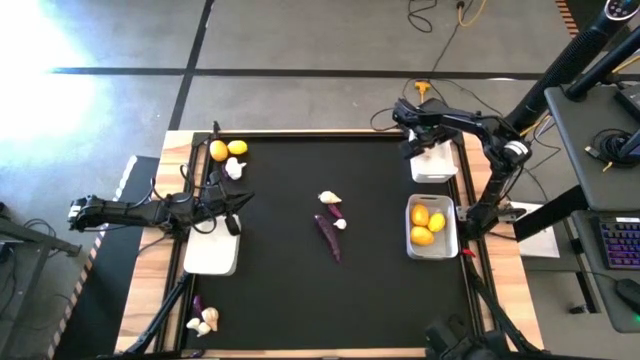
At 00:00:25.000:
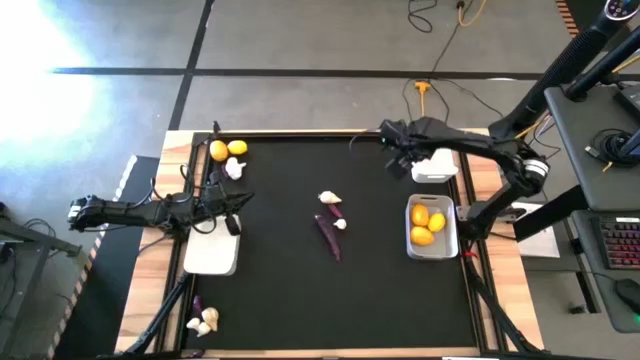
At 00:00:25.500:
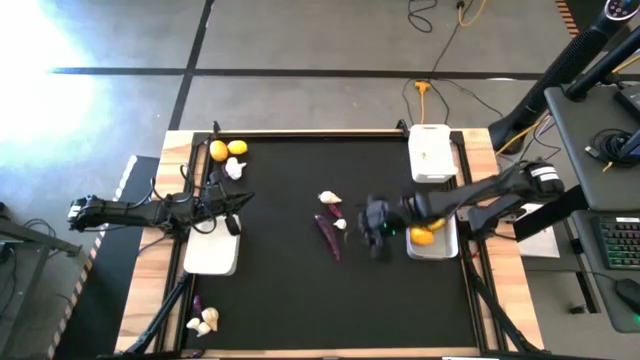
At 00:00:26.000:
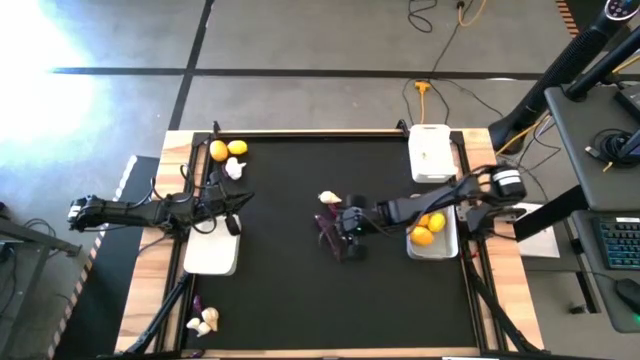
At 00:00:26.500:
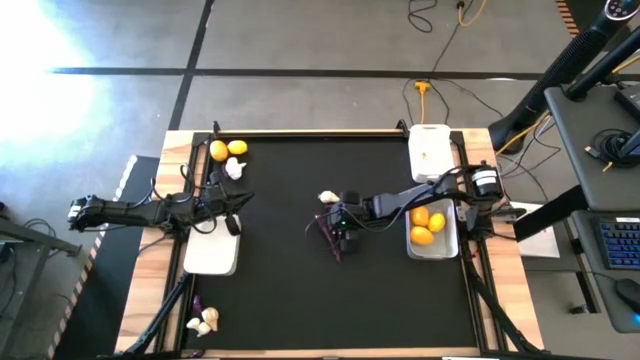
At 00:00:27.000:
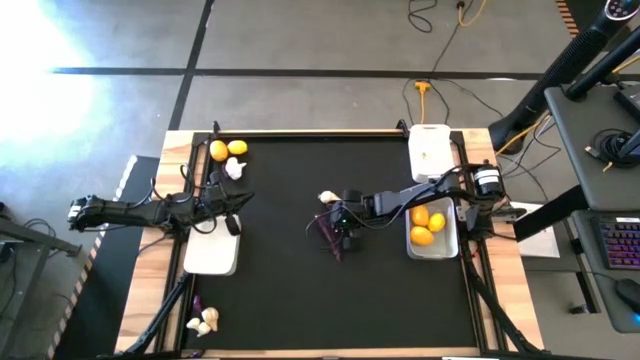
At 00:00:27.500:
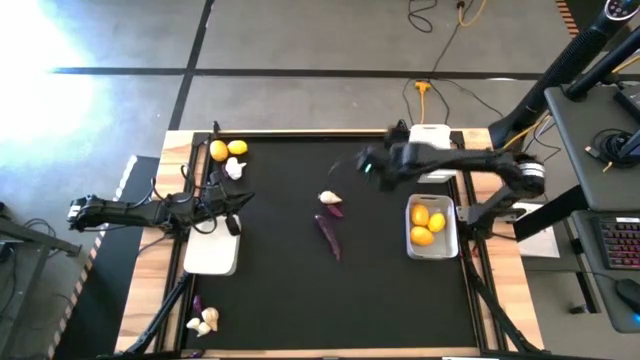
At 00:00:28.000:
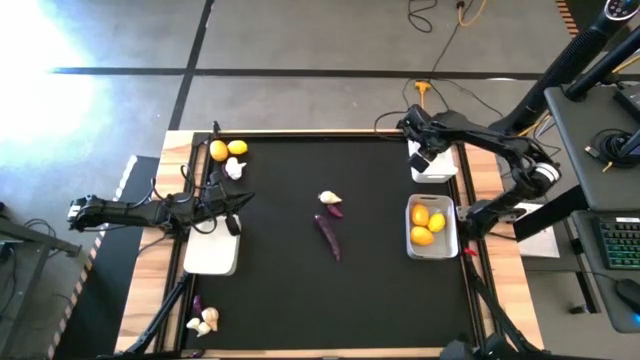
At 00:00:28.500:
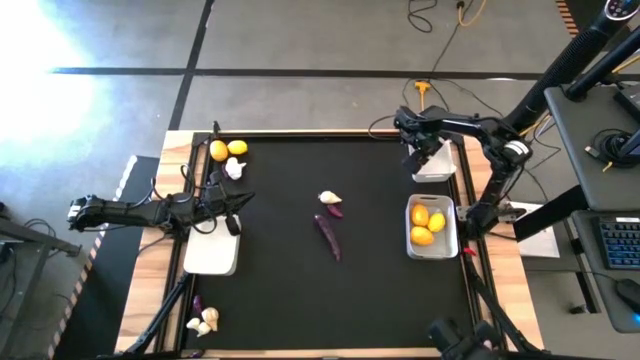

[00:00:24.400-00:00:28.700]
Task: Sort produce into baskets
Put the garlic into the top white bin

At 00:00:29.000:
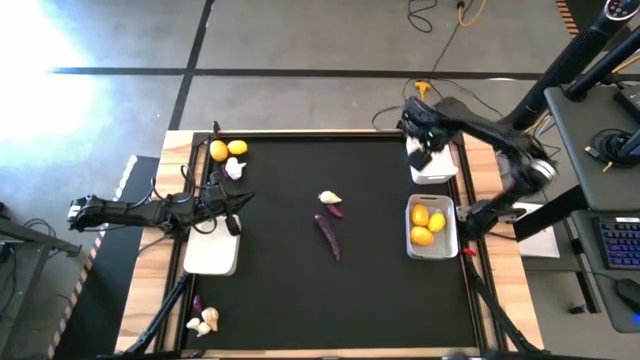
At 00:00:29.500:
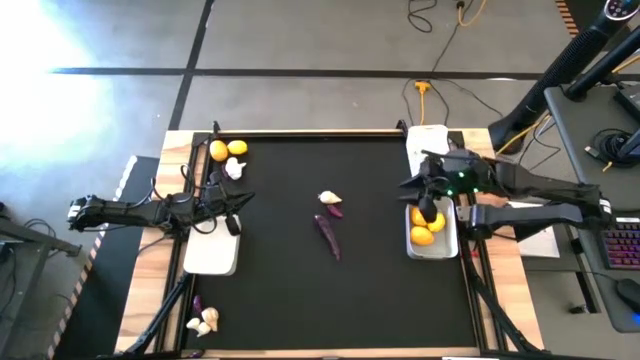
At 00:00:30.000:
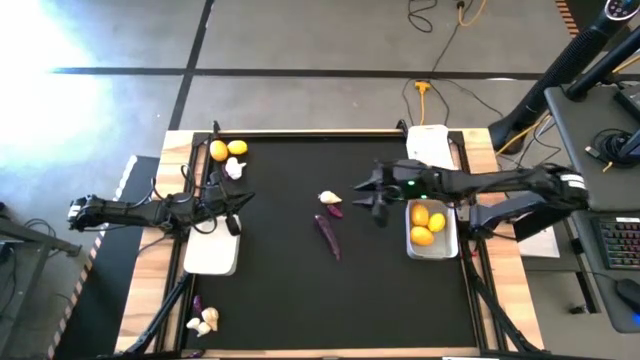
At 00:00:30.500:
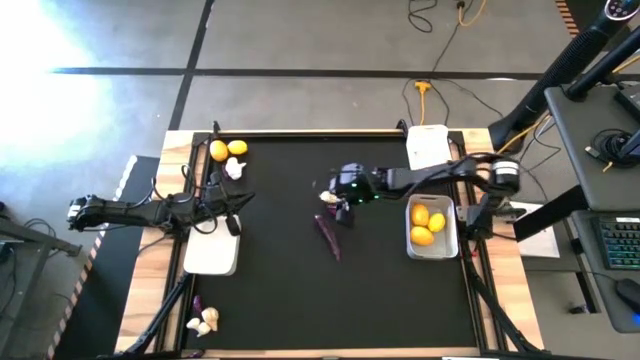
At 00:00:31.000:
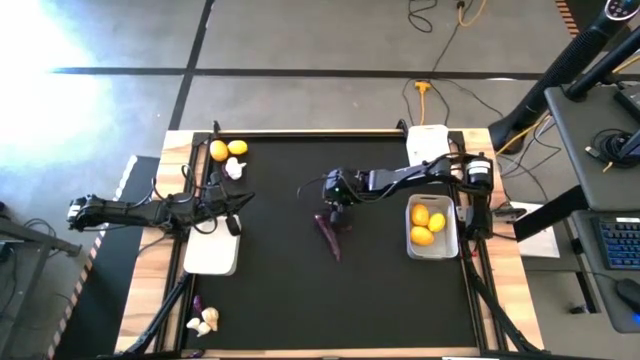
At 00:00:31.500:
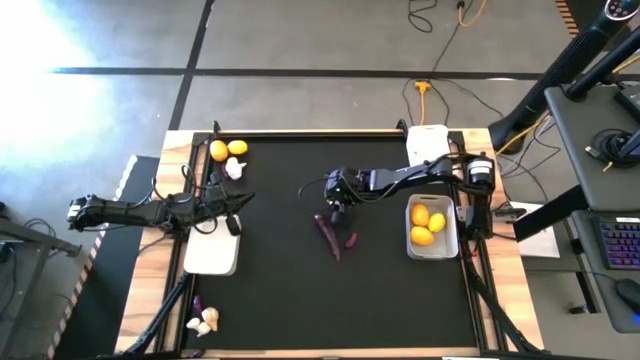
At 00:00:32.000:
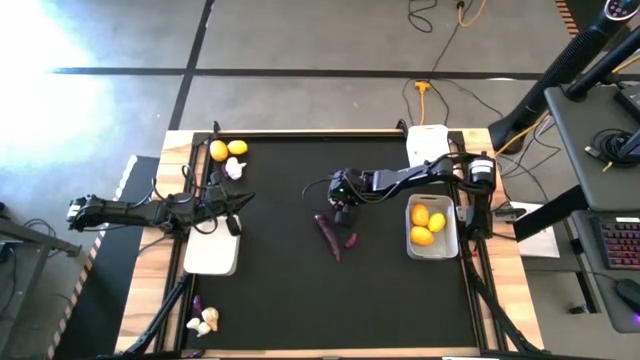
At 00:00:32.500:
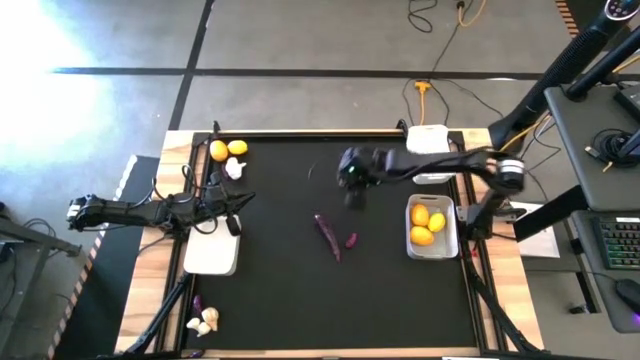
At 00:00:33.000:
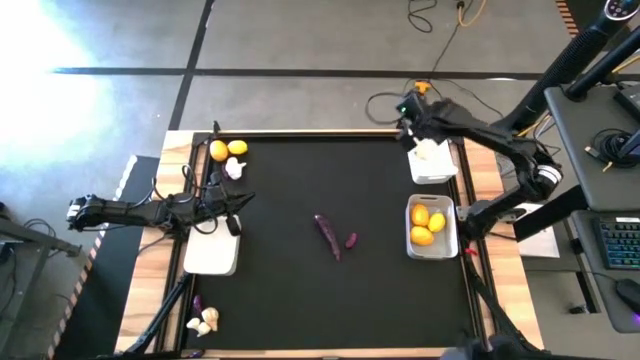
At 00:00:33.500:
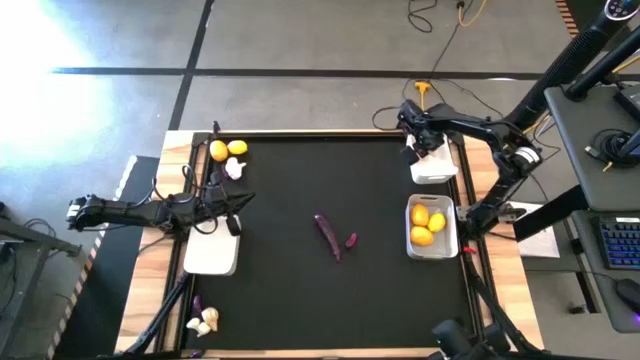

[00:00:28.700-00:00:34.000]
Put the garlic into the top white bin

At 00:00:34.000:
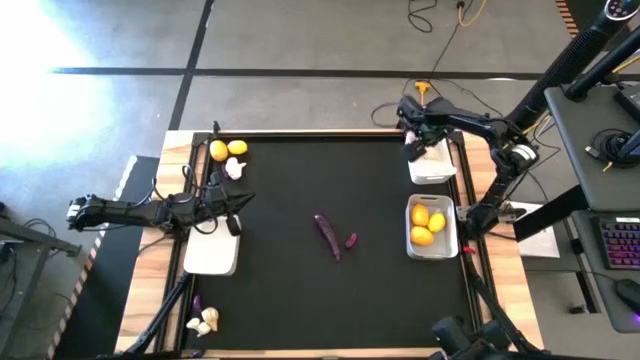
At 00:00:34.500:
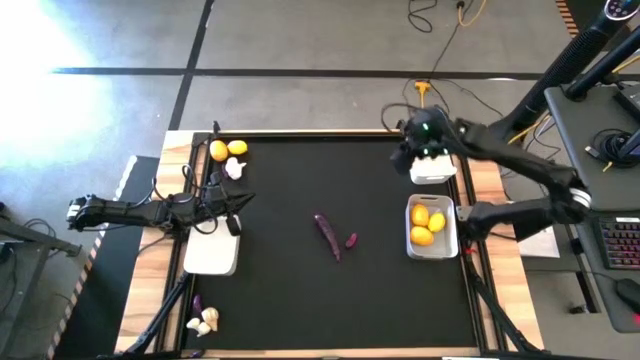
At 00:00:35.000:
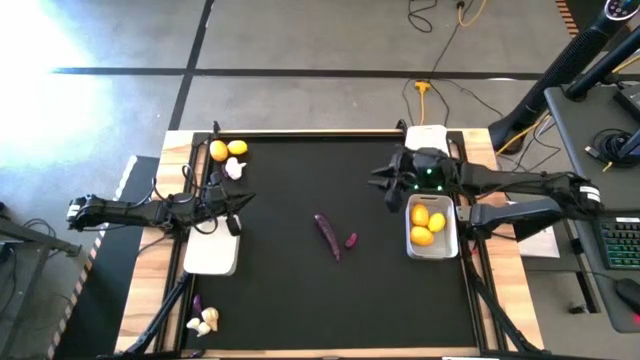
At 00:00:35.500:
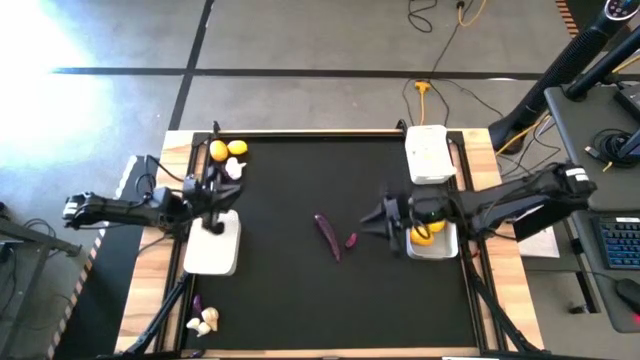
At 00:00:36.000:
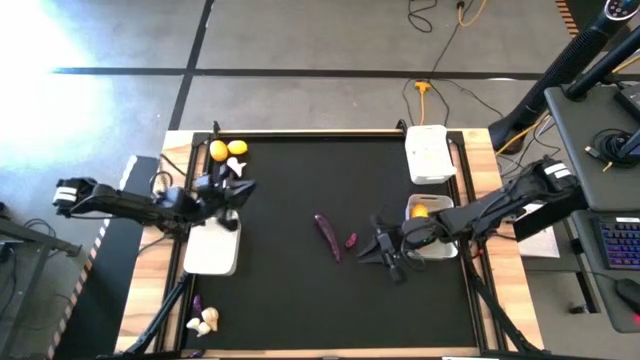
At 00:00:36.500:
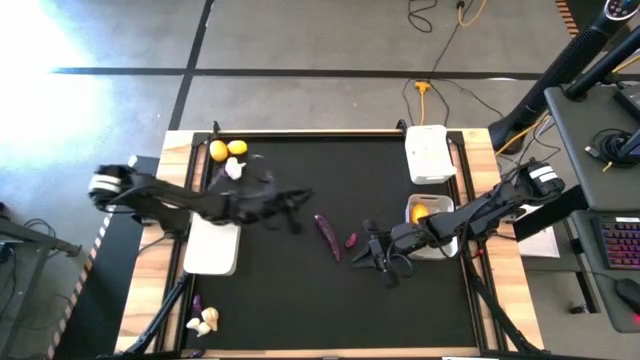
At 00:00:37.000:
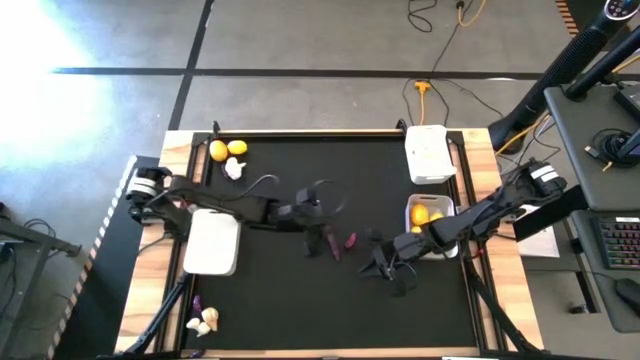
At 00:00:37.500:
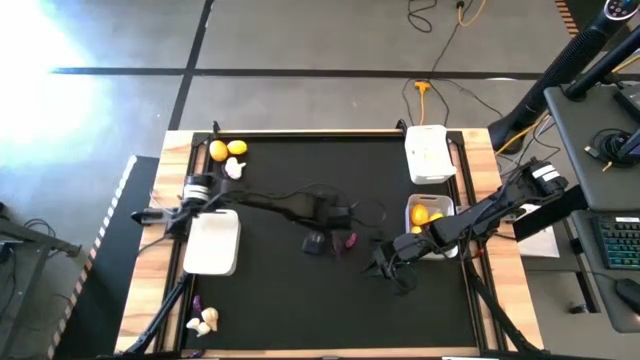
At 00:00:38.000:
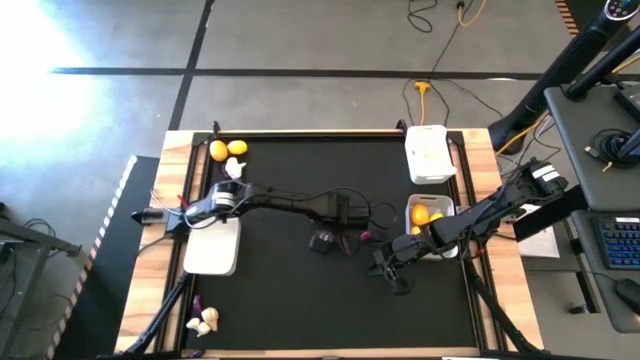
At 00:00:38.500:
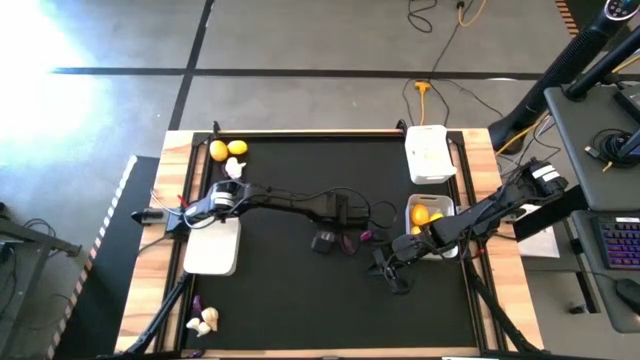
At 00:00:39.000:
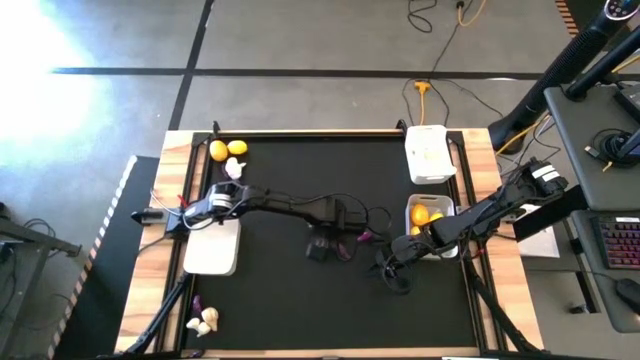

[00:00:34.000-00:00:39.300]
Put the eggplant into the bottom white bin

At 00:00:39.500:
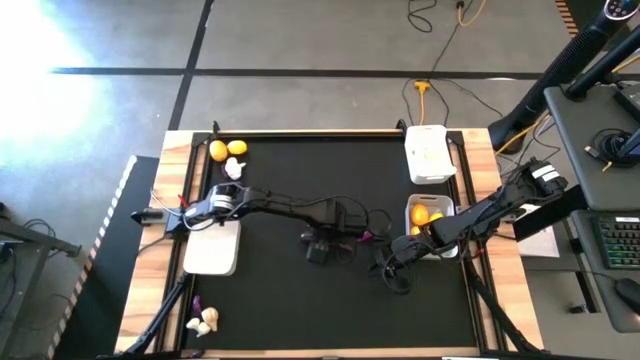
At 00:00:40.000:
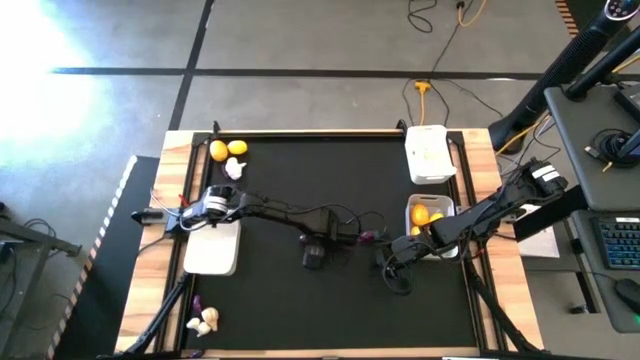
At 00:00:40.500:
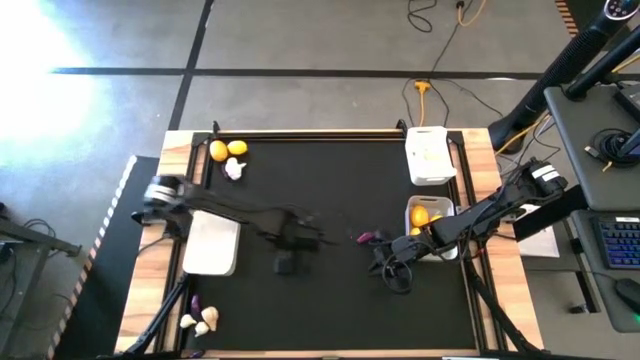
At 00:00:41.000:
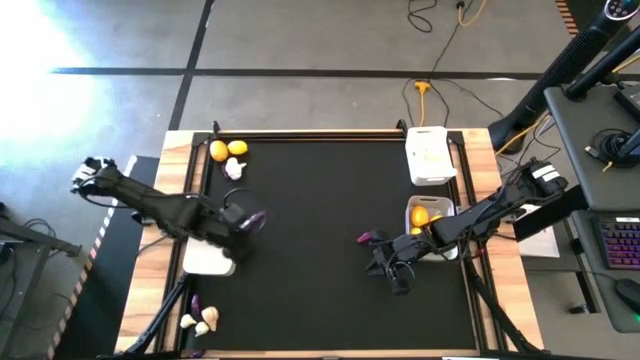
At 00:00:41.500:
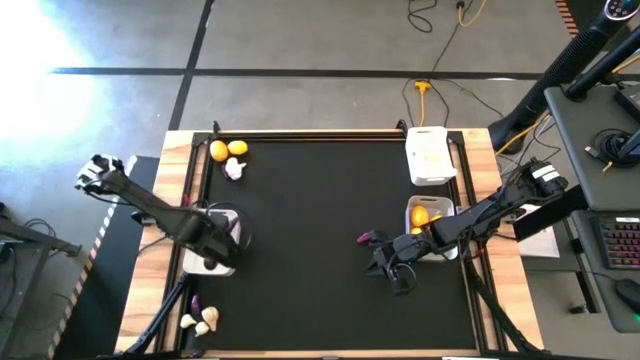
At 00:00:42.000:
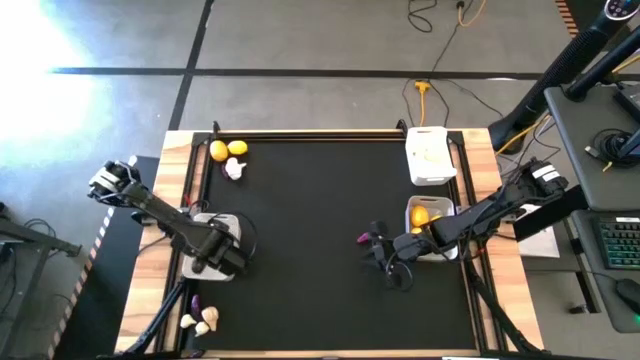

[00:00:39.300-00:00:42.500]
Put the eggplant into the bottom white bin

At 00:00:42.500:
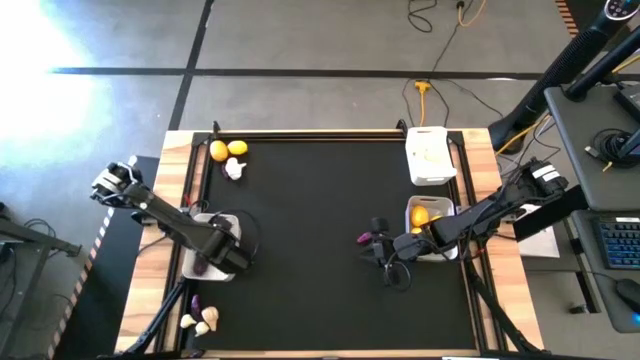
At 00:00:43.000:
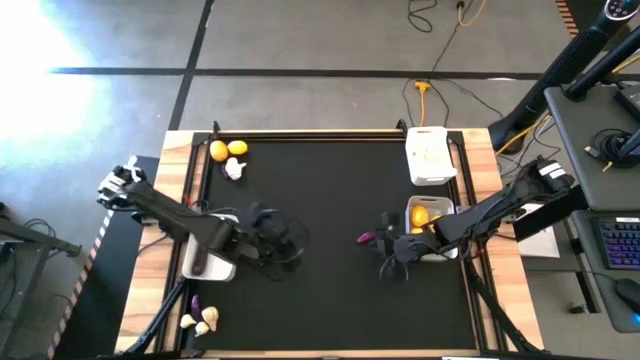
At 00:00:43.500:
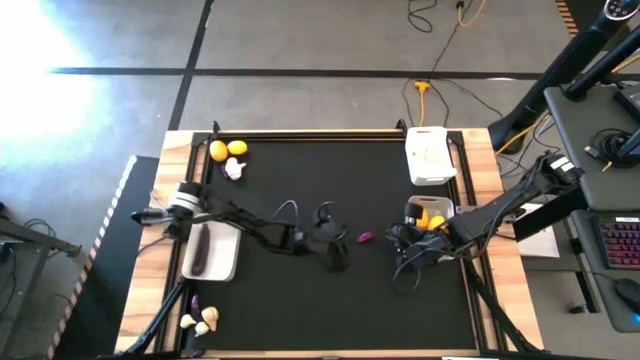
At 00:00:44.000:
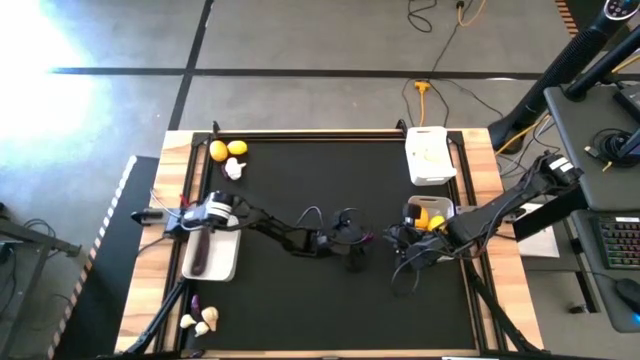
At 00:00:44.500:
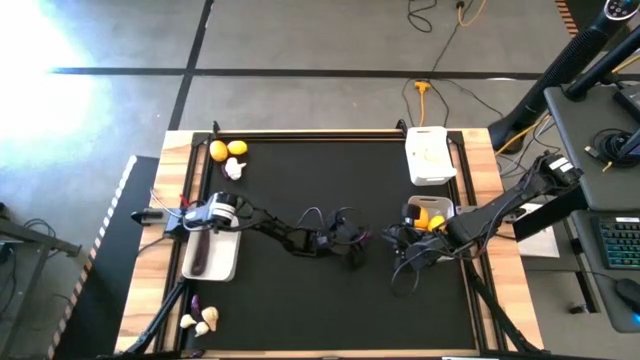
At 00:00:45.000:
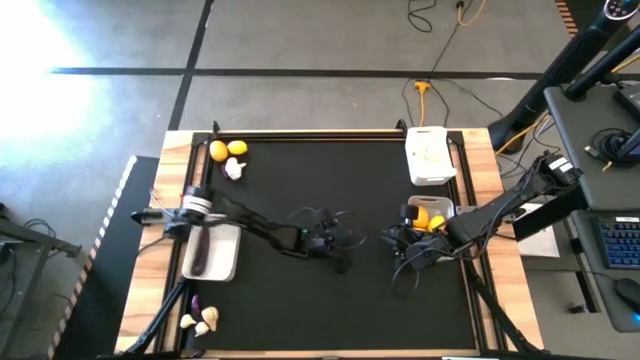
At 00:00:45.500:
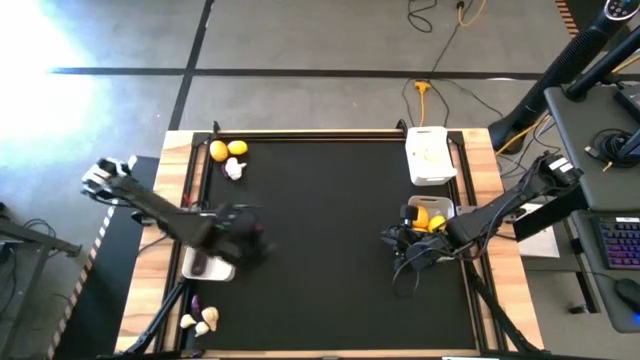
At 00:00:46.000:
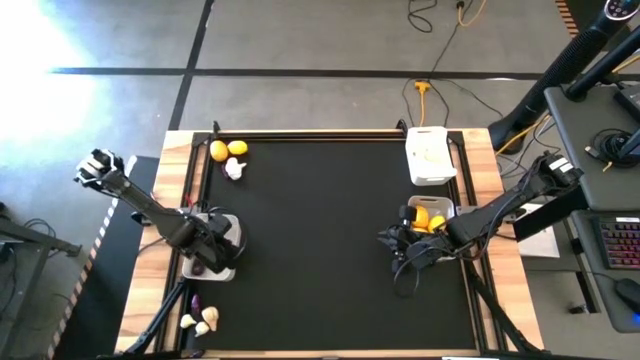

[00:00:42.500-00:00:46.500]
Put the eggplant into the bottom white bin
